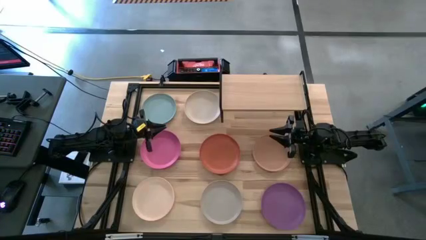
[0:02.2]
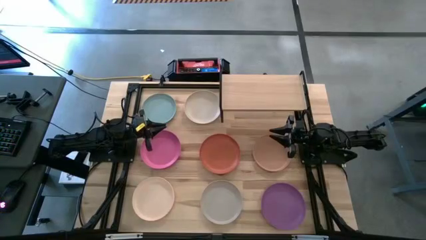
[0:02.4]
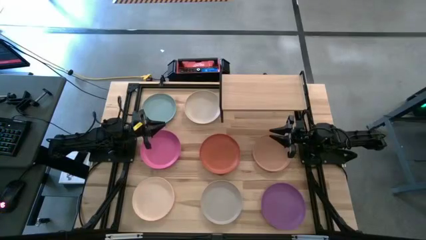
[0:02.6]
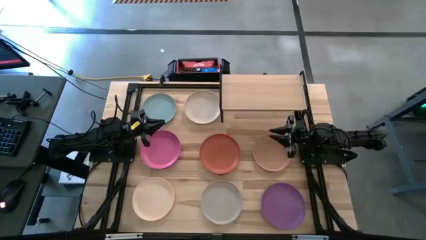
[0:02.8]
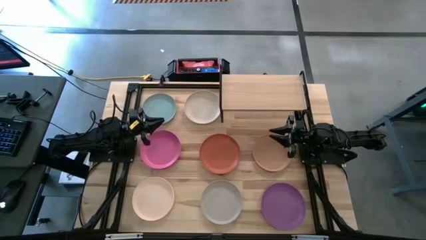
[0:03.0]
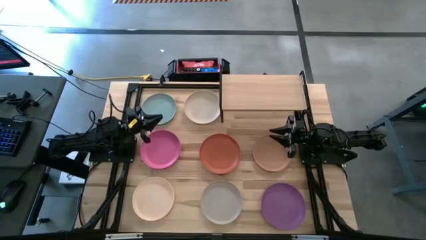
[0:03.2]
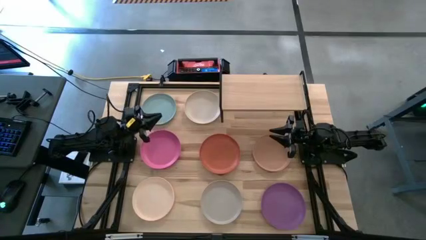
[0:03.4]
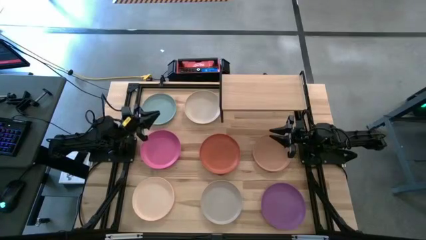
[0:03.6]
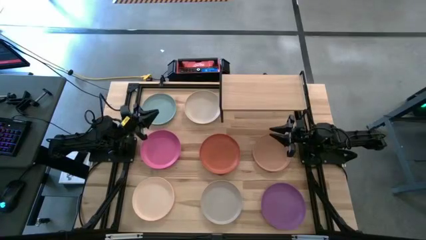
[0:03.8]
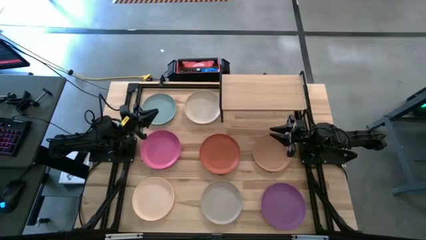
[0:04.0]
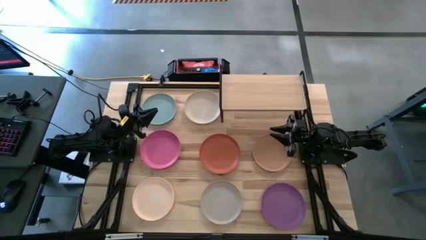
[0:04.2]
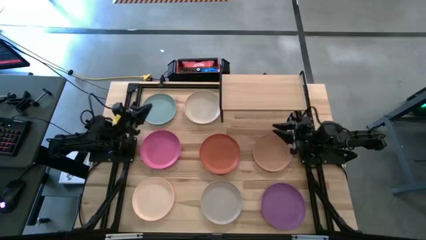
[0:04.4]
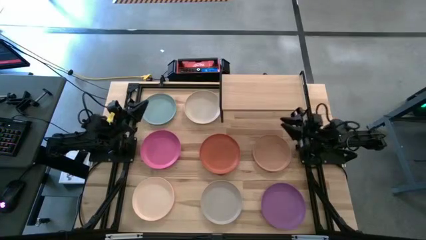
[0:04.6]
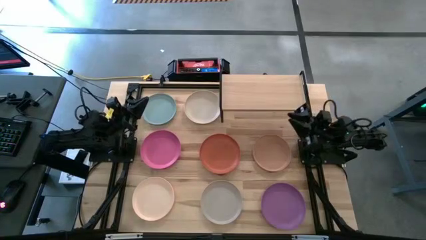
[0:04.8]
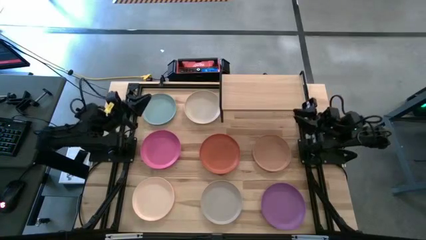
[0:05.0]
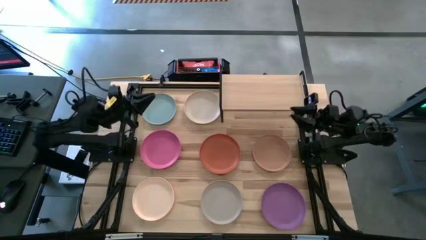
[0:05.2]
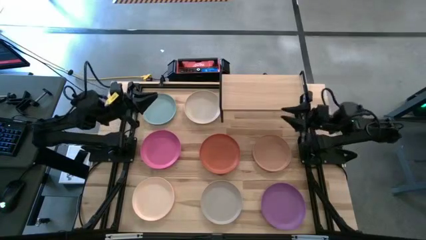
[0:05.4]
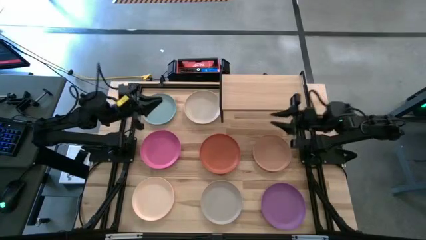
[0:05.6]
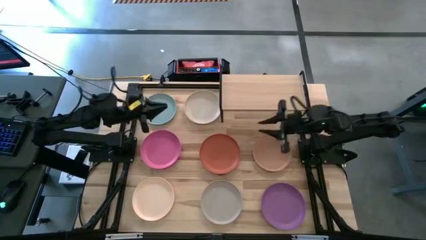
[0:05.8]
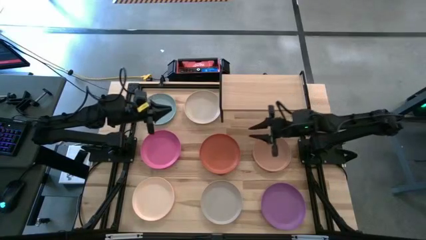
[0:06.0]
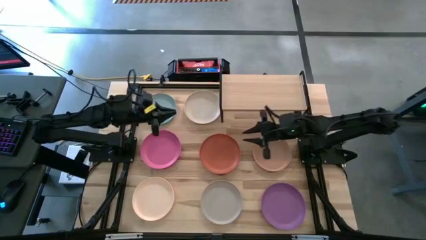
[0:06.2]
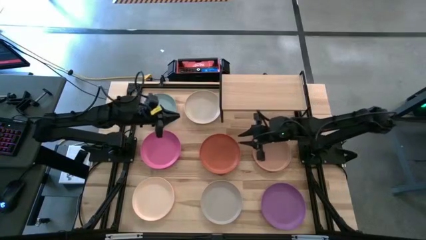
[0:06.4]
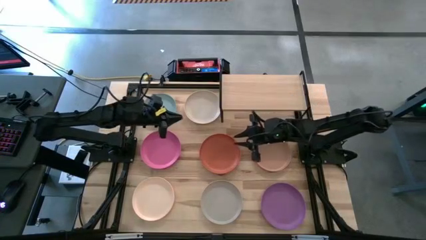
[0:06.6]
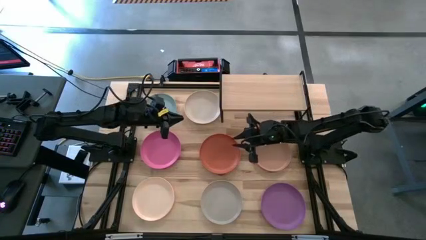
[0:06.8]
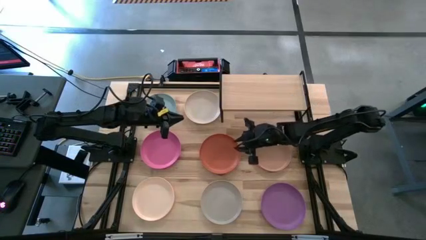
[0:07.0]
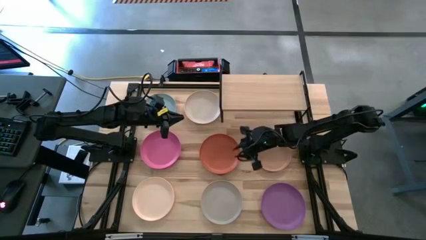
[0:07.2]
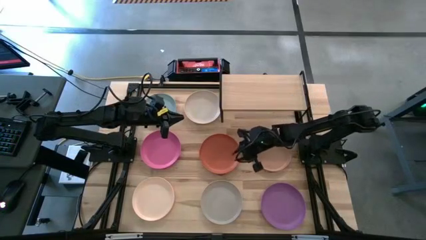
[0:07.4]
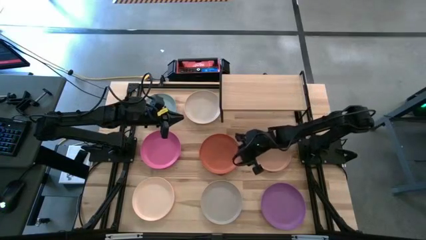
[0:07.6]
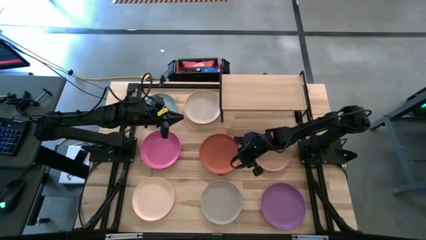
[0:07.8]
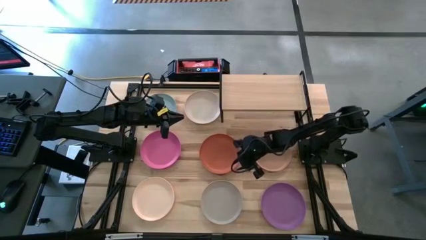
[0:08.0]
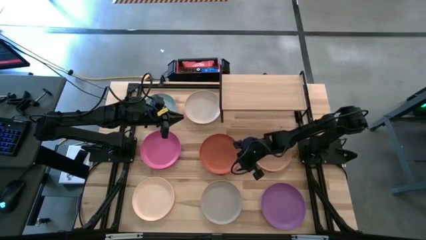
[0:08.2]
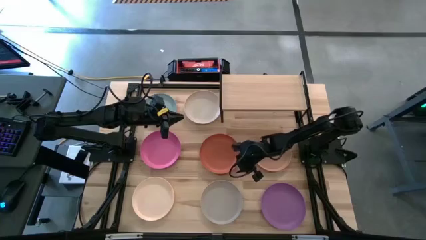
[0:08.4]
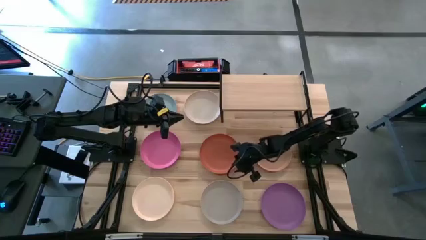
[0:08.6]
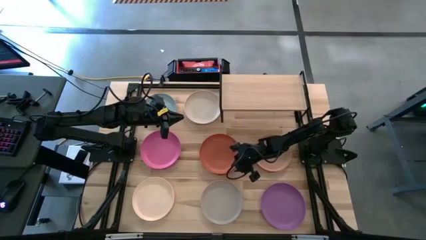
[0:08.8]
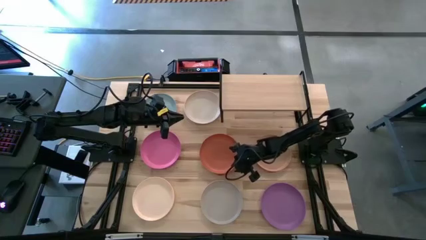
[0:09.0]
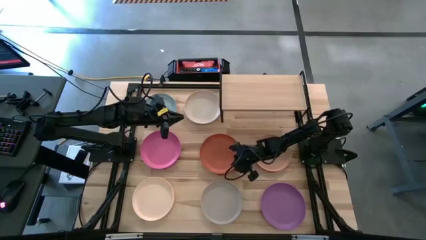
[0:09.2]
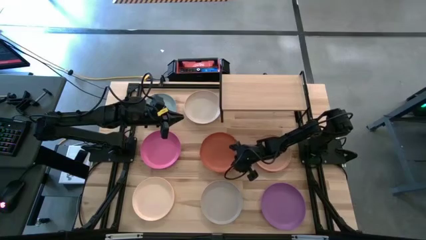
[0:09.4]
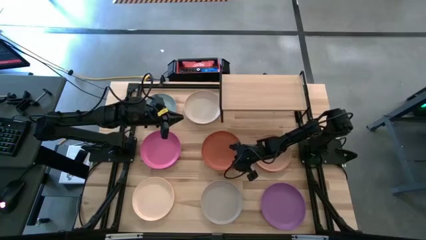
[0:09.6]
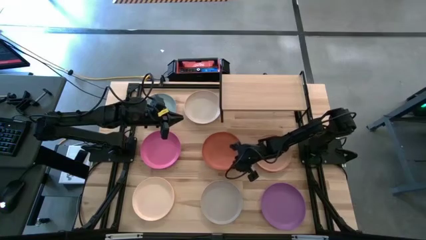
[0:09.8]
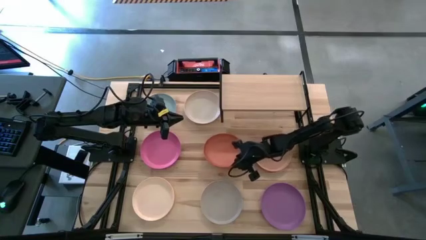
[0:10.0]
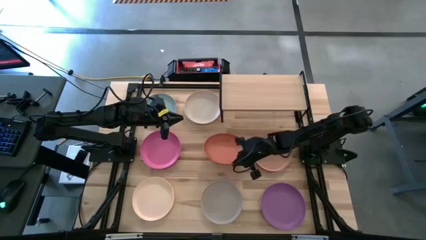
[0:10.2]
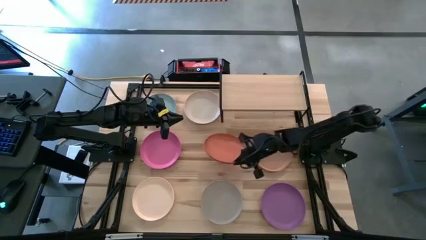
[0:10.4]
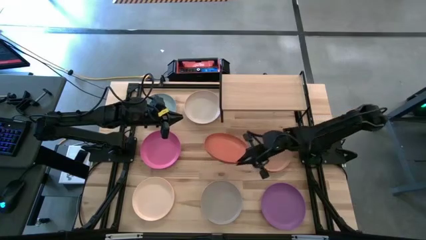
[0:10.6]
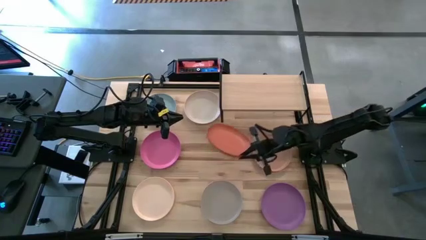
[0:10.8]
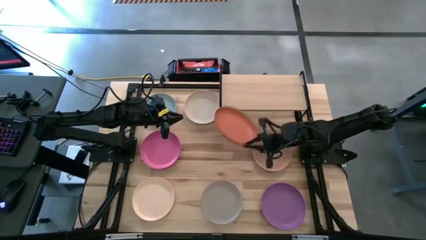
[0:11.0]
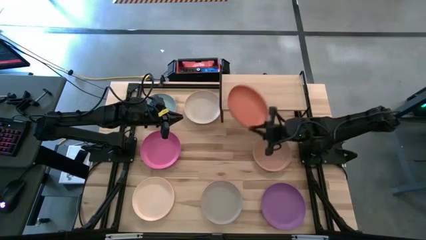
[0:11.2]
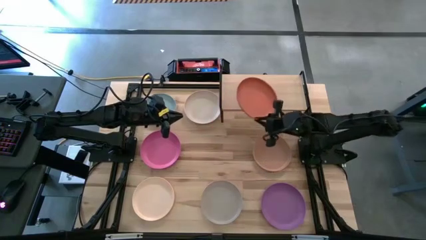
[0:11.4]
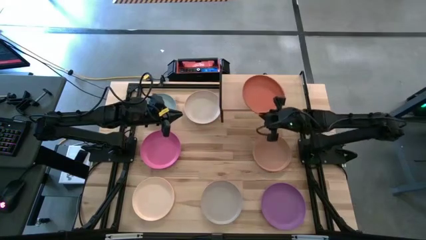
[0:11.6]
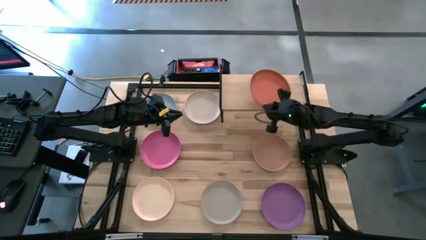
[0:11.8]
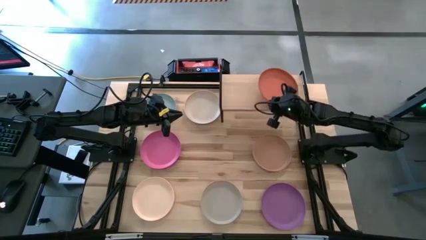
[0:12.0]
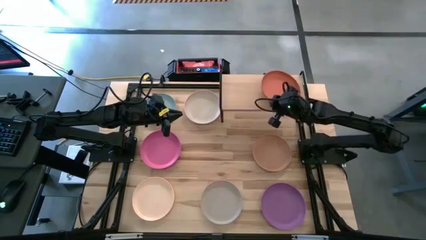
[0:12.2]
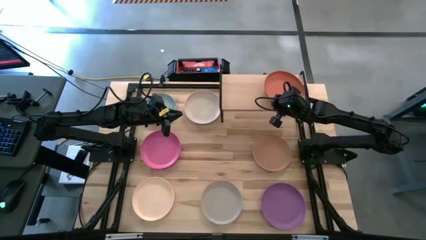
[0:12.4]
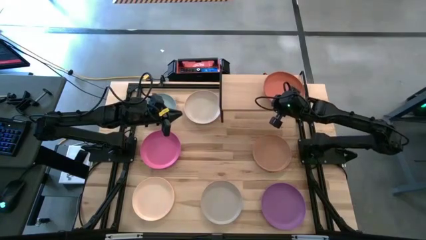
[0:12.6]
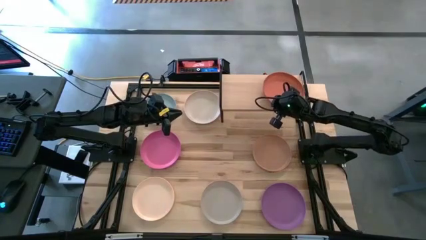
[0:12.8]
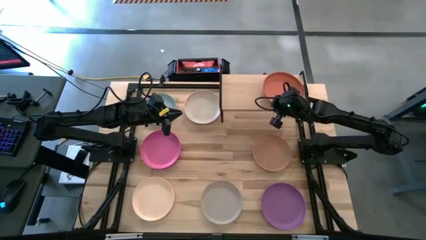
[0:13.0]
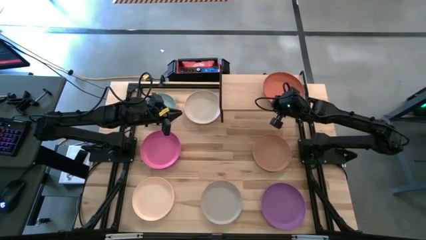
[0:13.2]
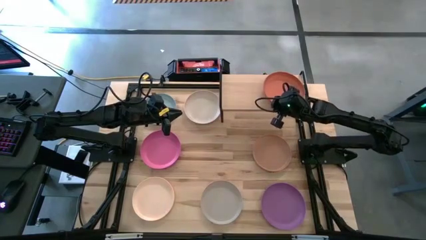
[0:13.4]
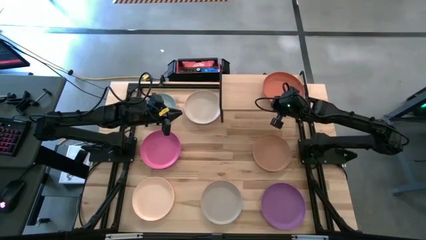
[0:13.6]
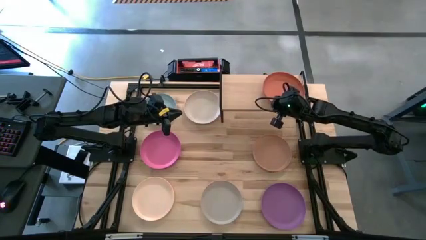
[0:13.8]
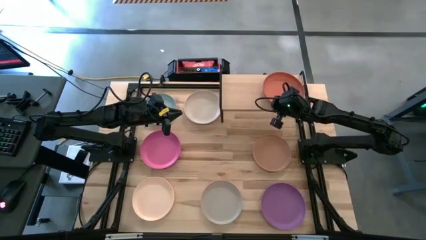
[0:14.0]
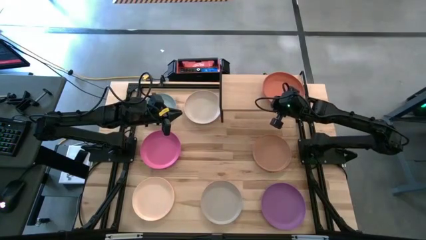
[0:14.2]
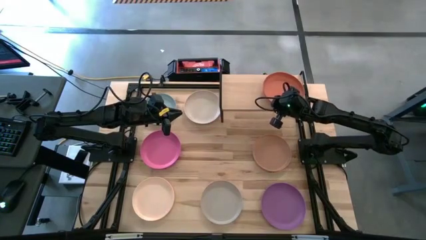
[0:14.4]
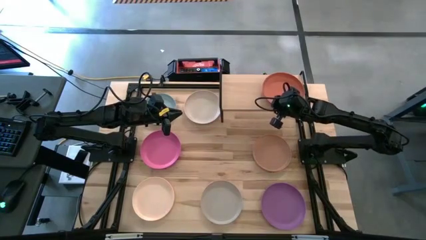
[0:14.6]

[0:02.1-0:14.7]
Task: Place and stack plates onto a shelf
Put the orange plate on the shelf
